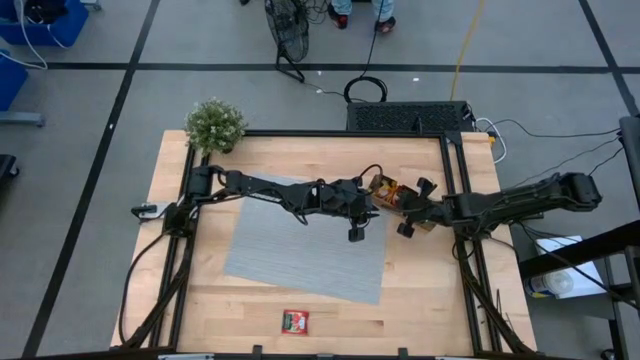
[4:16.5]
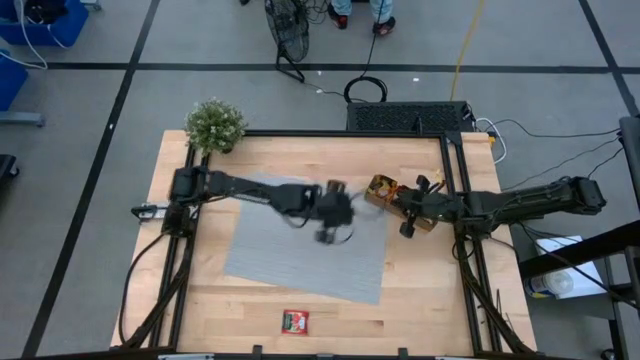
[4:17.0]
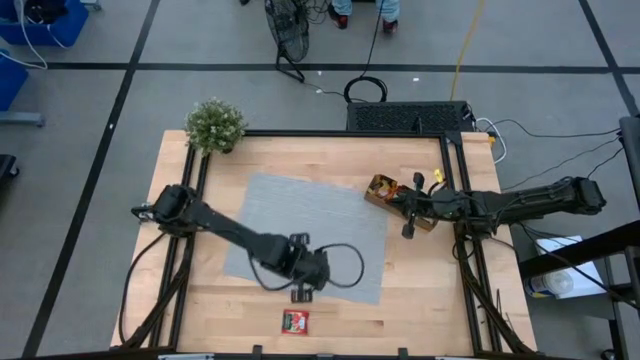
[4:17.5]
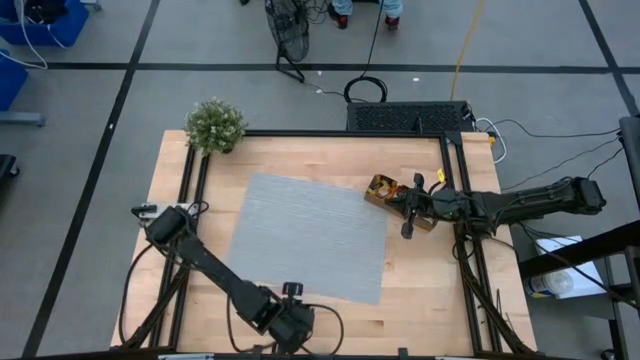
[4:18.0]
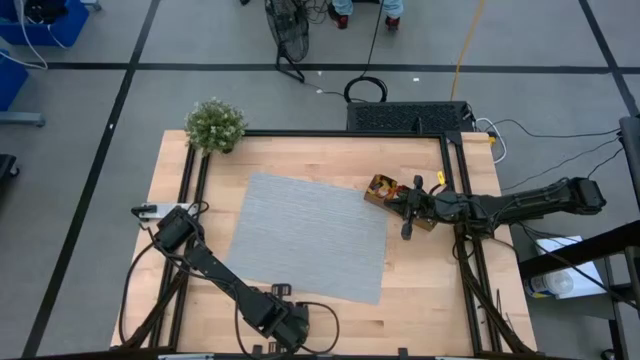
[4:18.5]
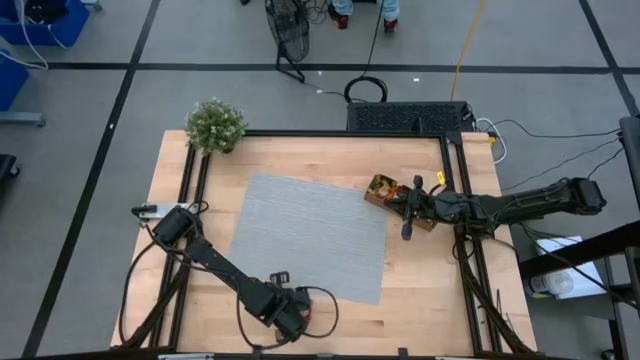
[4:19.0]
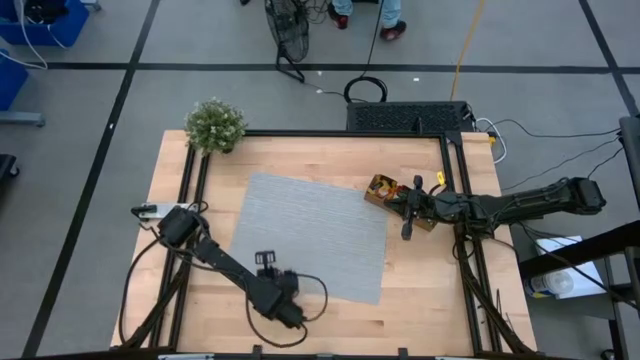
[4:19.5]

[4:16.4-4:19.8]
Task: Pick & Place Tea
Put the red tea bag into the middle section of the wooden organizer

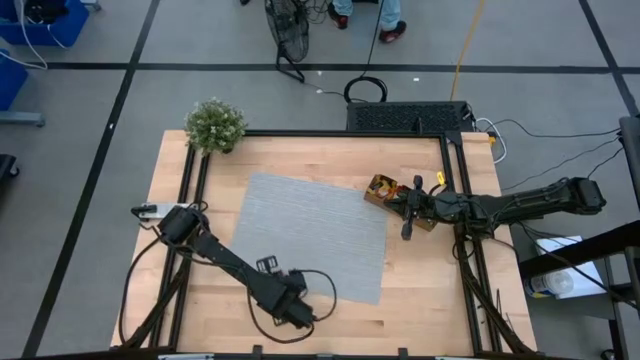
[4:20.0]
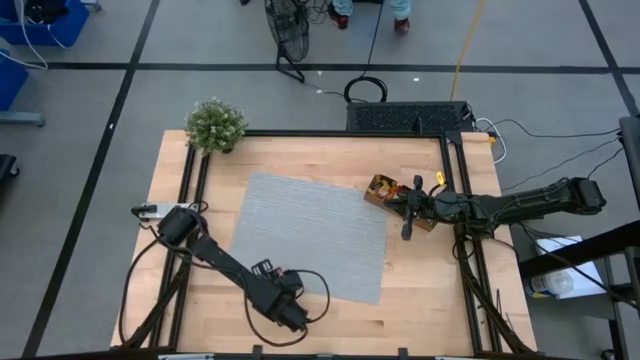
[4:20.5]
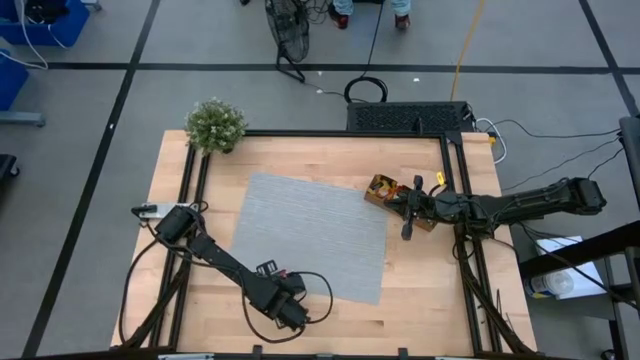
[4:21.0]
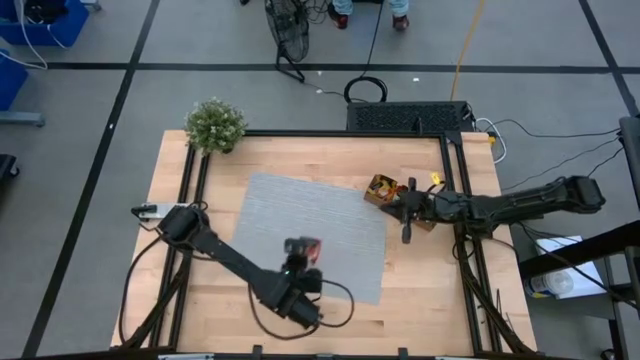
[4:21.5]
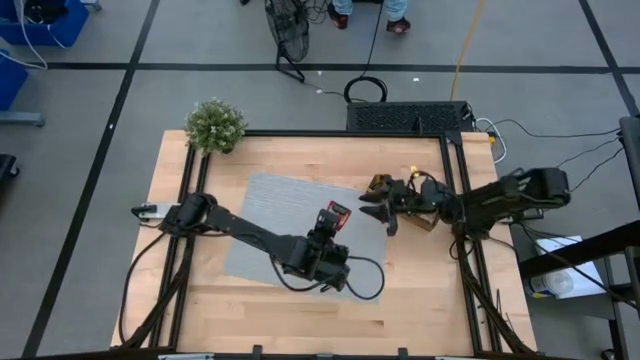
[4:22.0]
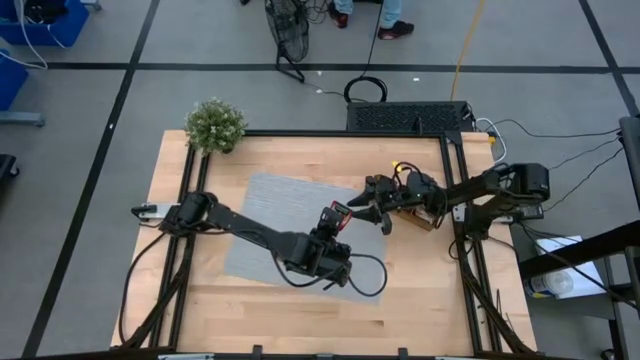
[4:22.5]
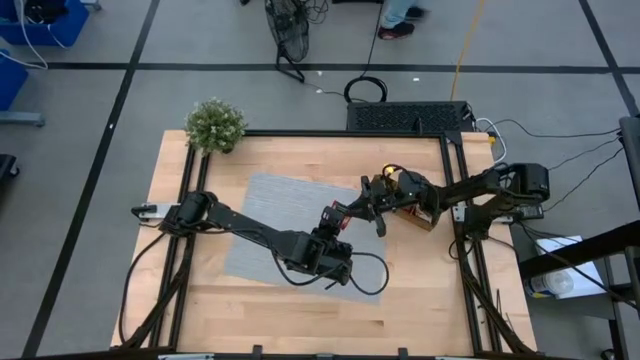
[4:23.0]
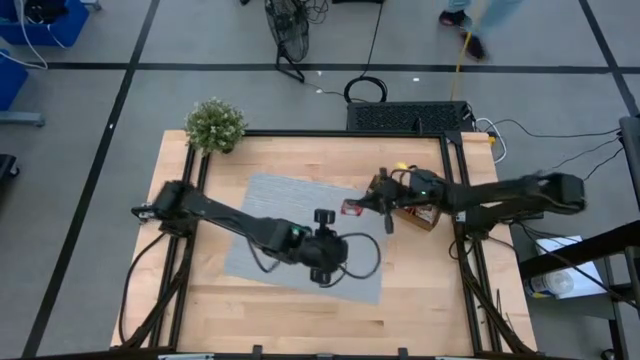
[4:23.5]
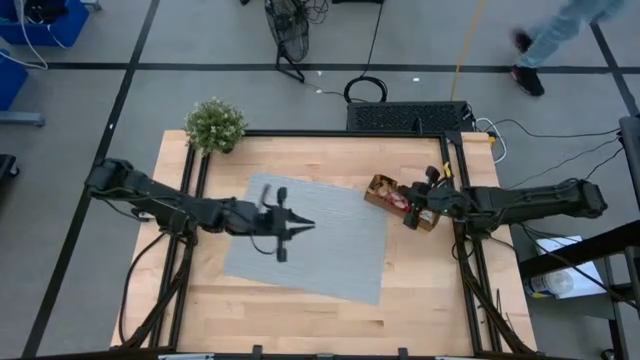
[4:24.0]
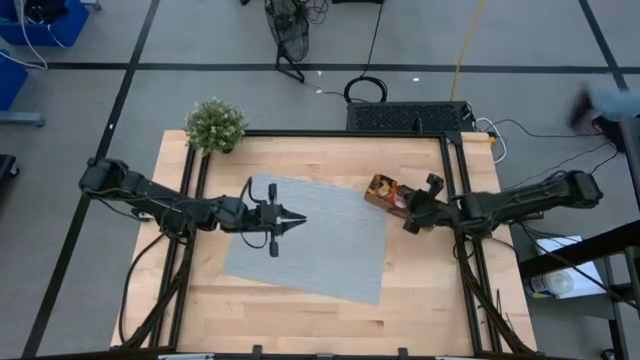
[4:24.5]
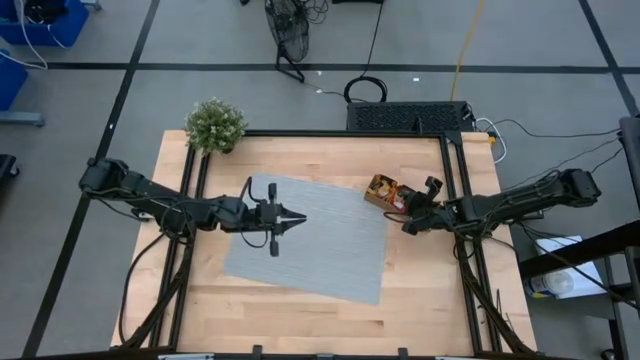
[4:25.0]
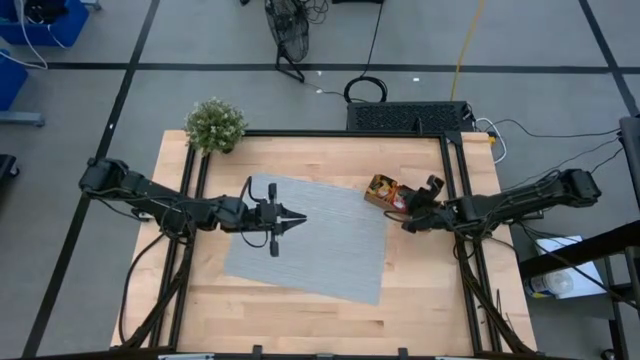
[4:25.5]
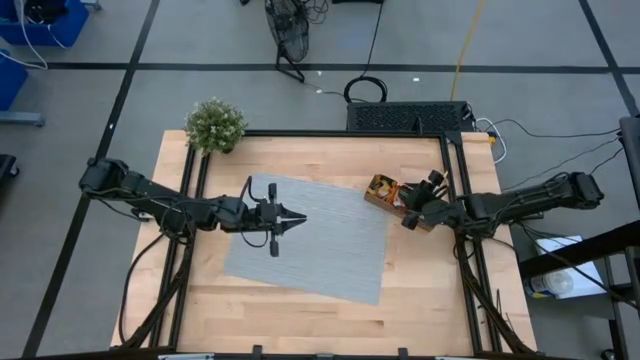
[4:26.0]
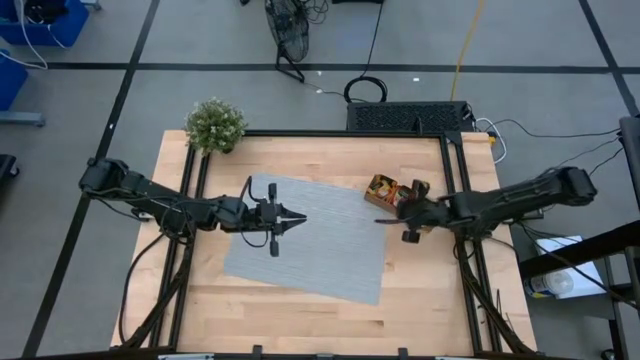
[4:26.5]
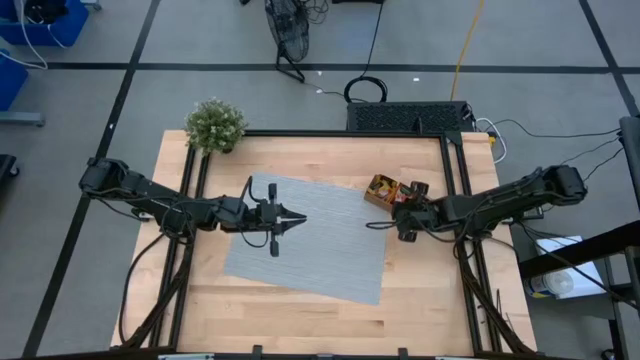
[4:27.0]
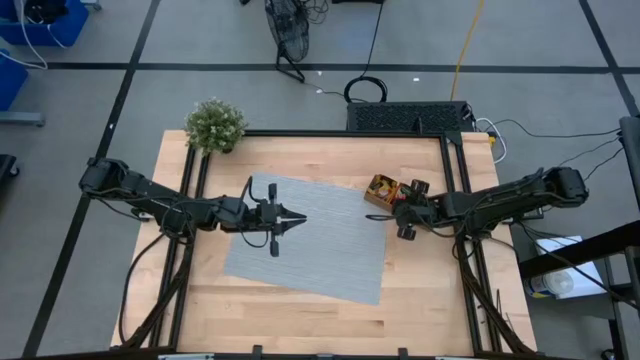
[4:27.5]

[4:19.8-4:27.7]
Put the red tea bag into the middle section of the wooden organizer

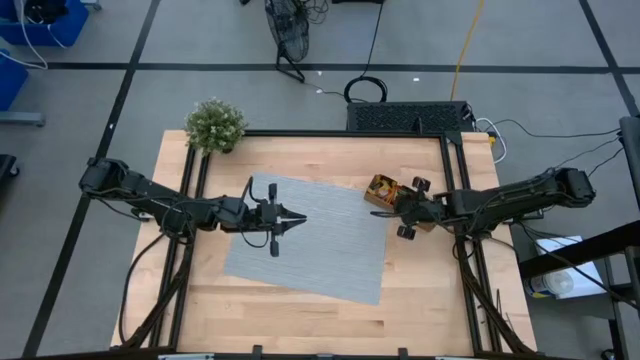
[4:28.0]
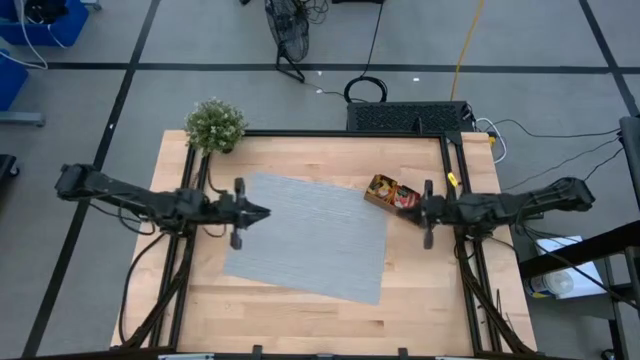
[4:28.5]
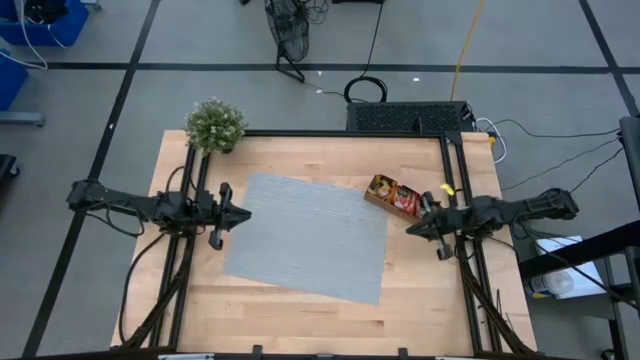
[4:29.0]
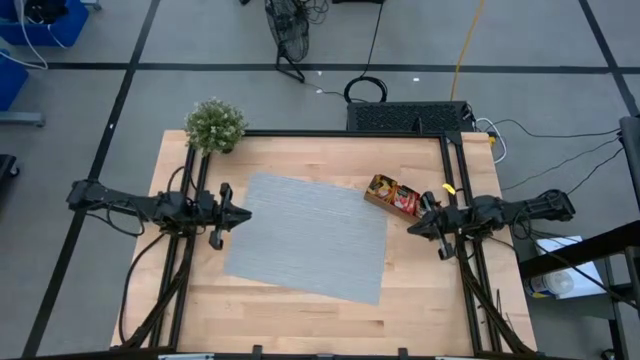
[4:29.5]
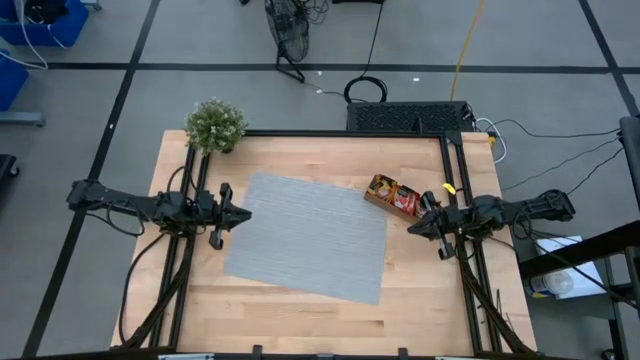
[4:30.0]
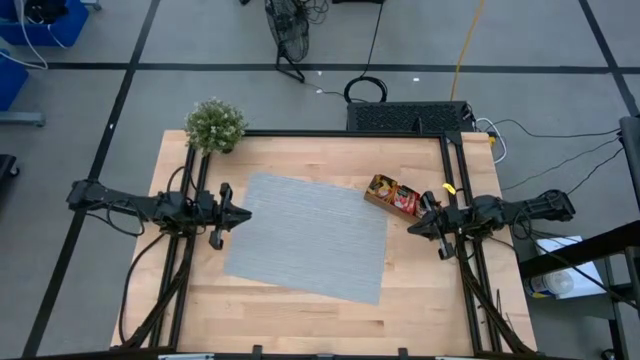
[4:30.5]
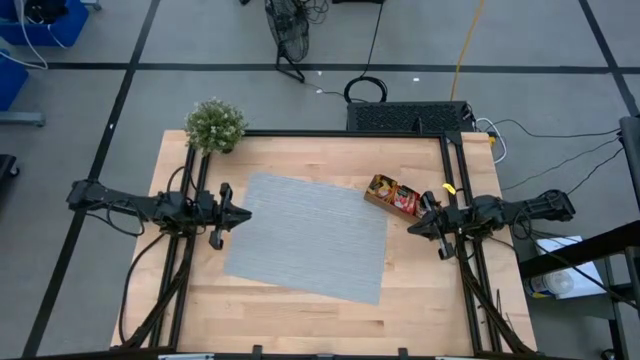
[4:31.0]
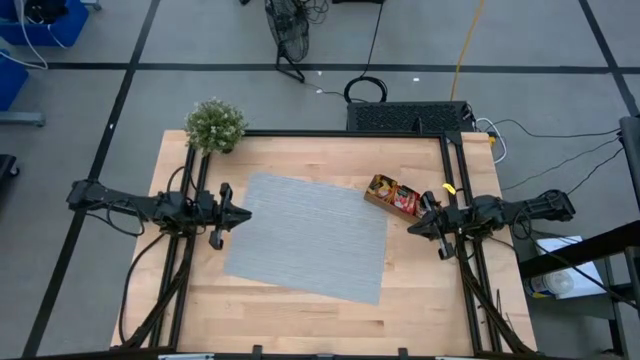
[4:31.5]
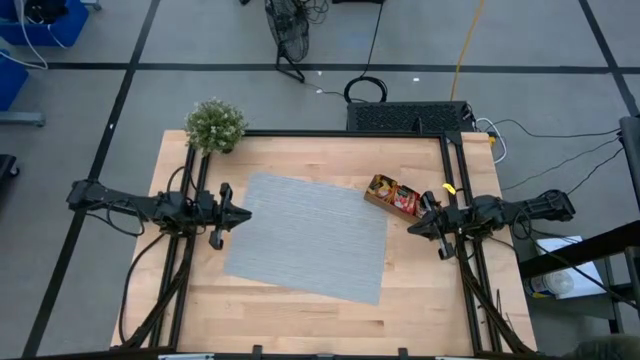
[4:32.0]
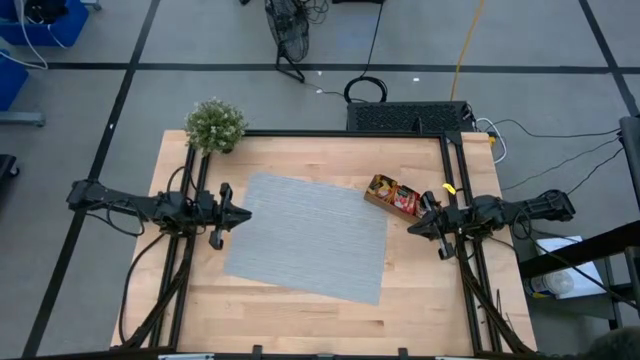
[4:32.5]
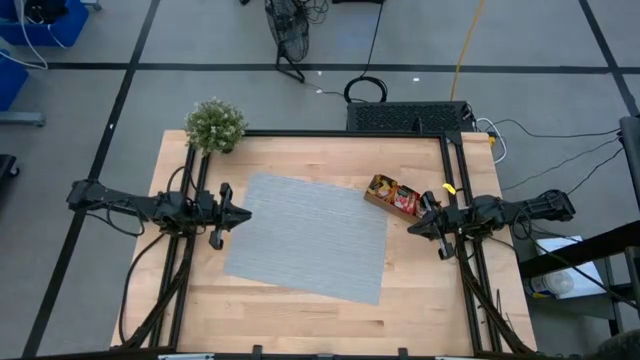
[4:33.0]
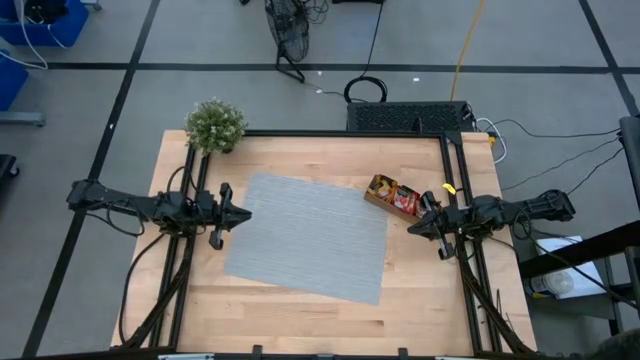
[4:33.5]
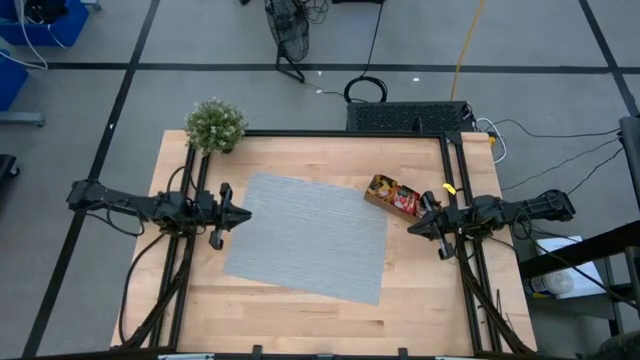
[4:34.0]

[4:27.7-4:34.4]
Return to Home Position

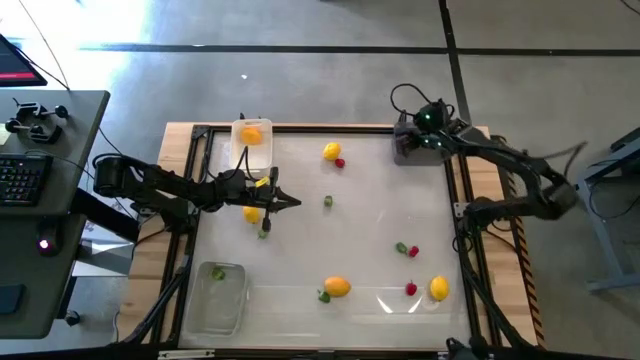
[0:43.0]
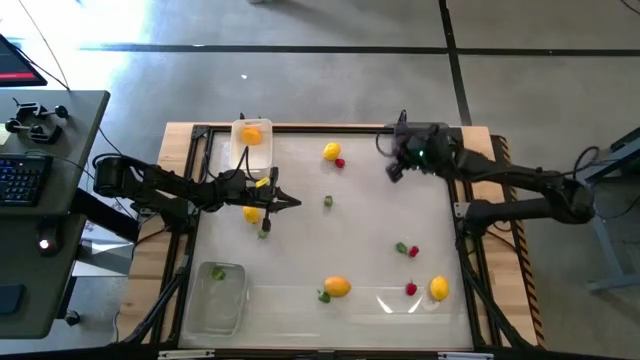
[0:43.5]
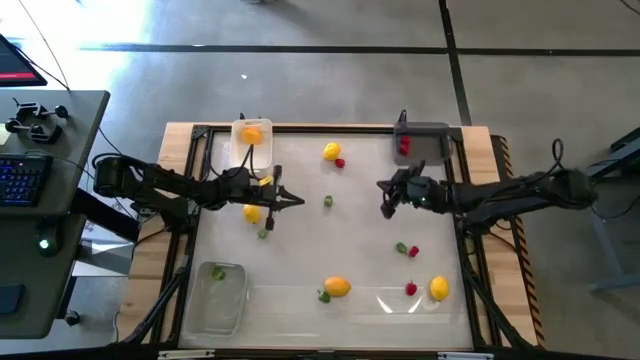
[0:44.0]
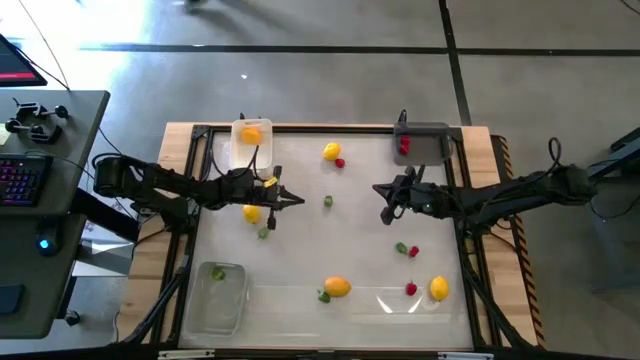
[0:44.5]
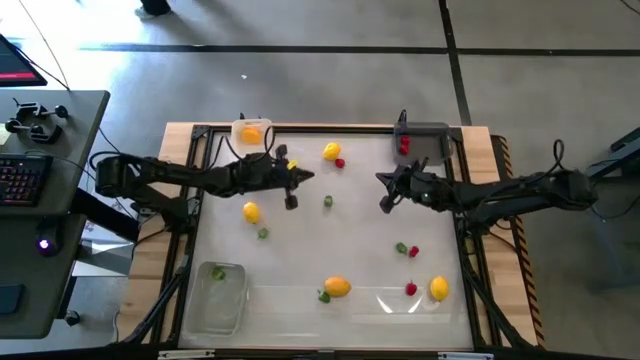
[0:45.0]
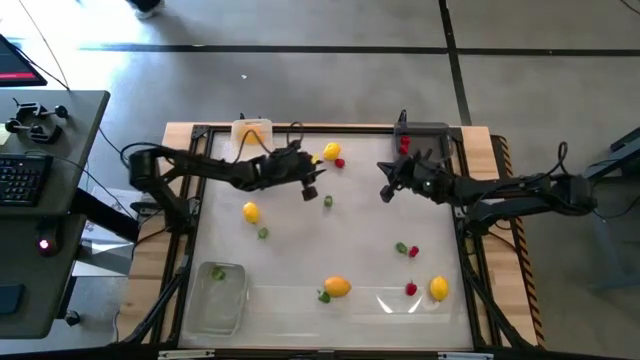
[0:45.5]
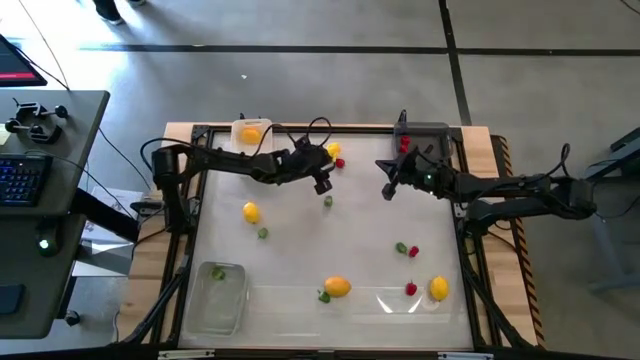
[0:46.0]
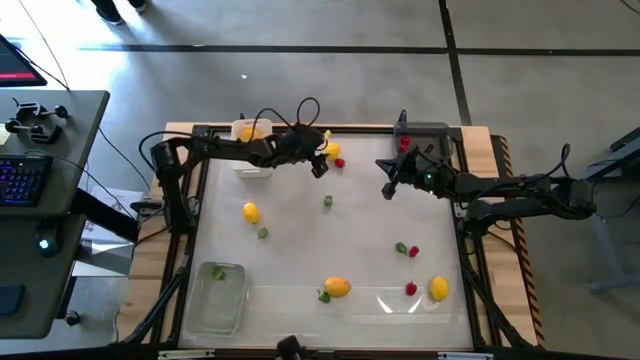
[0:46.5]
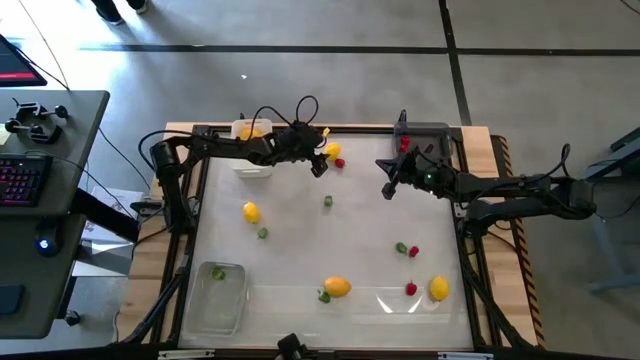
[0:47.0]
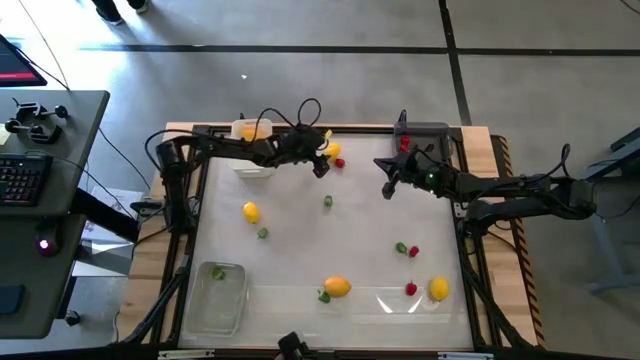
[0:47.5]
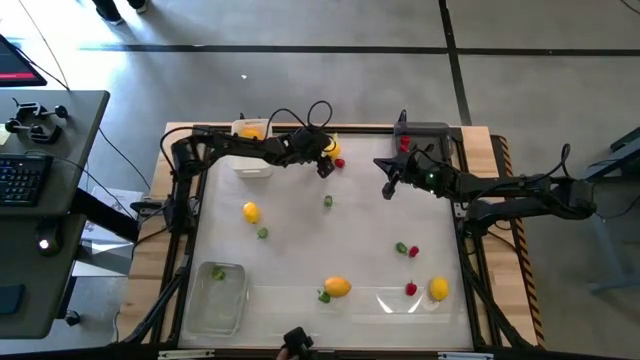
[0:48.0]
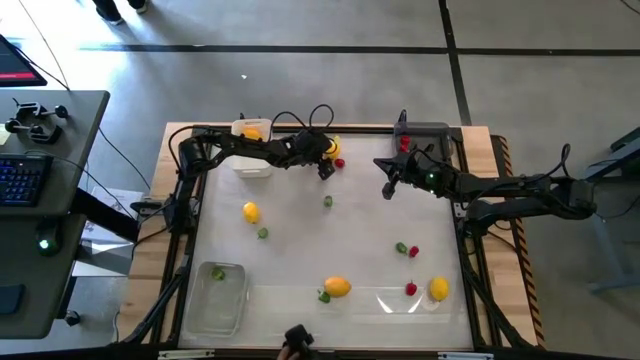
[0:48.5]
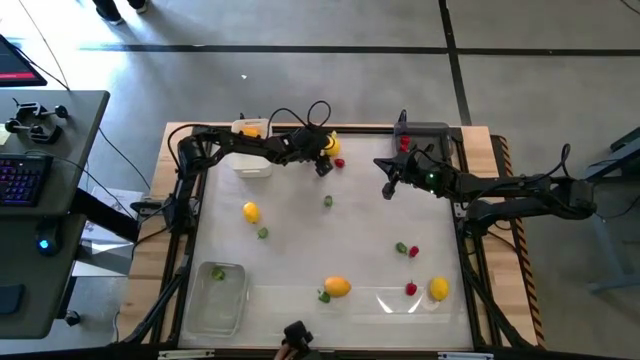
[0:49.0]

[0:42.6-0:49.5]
Task: Sort produce into baskets
Put the lemon into the white bin
